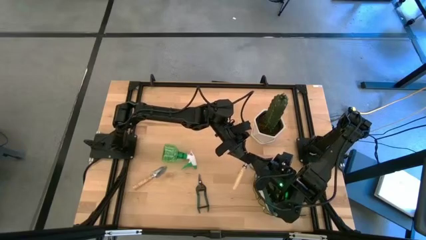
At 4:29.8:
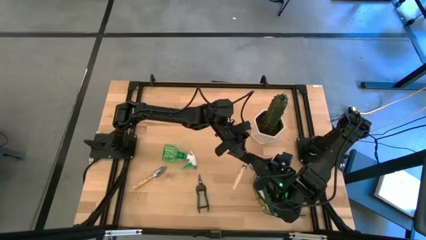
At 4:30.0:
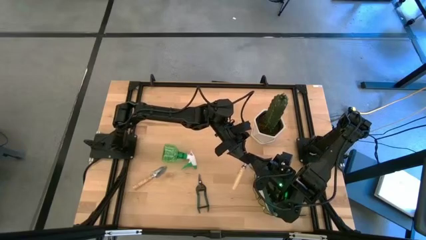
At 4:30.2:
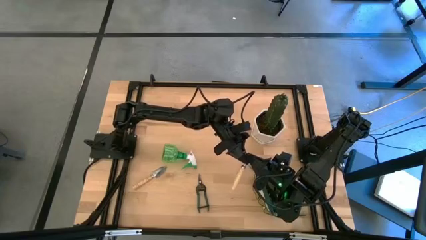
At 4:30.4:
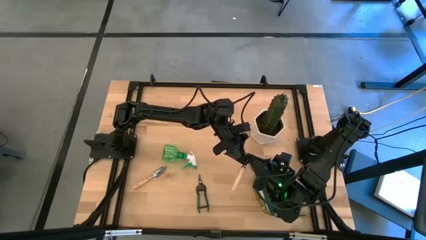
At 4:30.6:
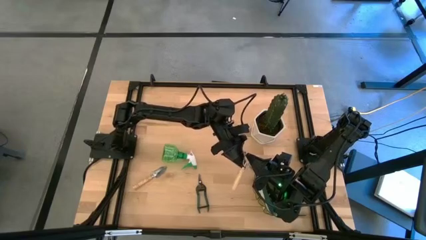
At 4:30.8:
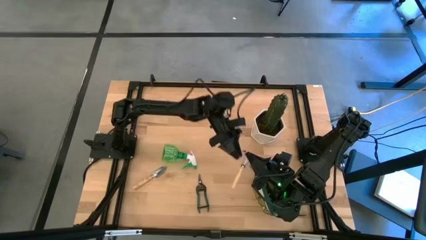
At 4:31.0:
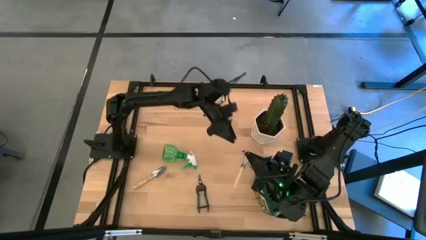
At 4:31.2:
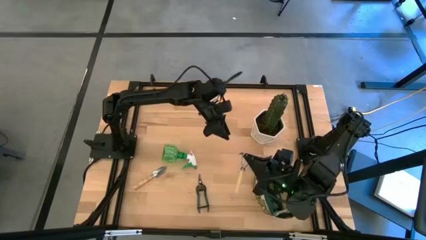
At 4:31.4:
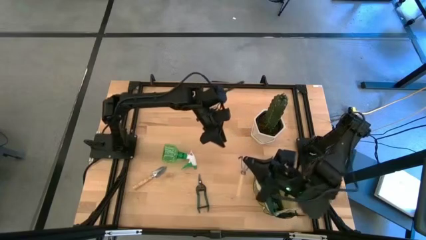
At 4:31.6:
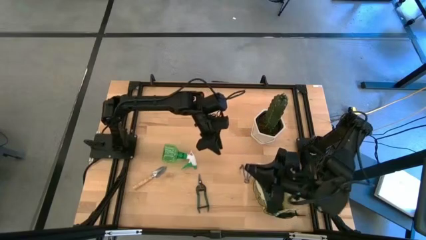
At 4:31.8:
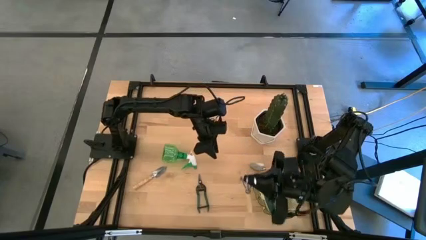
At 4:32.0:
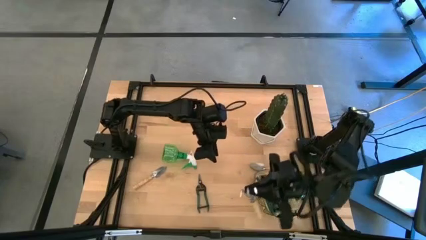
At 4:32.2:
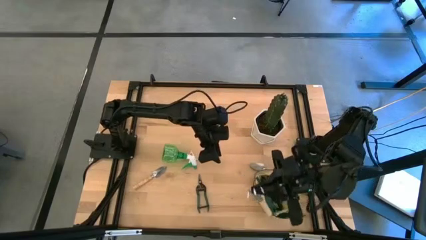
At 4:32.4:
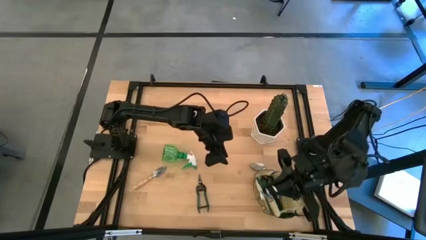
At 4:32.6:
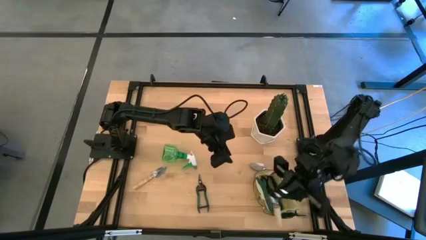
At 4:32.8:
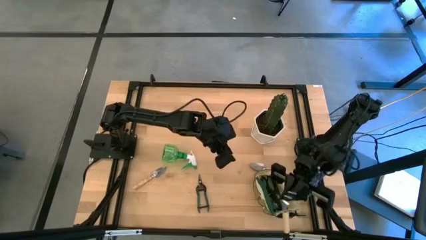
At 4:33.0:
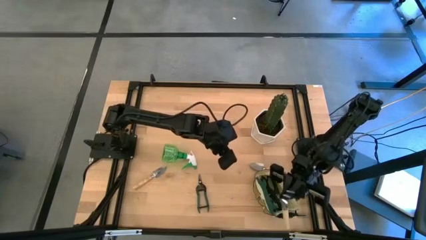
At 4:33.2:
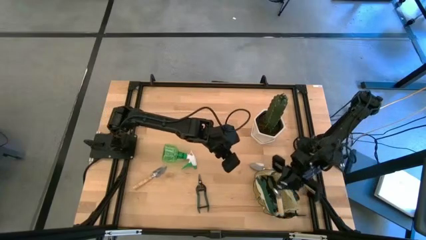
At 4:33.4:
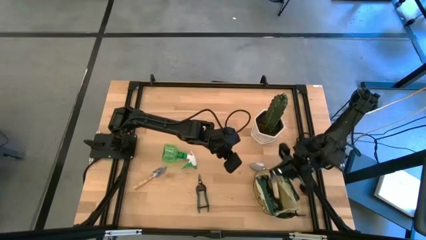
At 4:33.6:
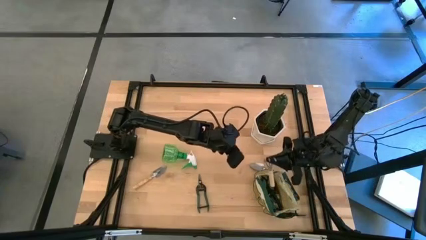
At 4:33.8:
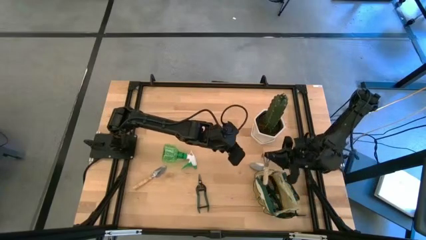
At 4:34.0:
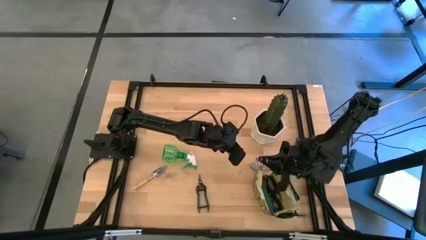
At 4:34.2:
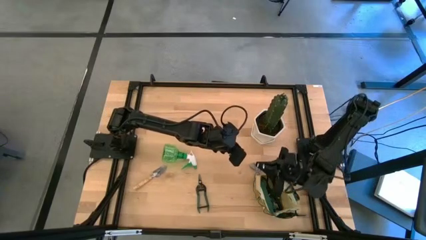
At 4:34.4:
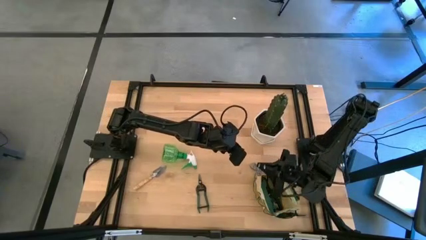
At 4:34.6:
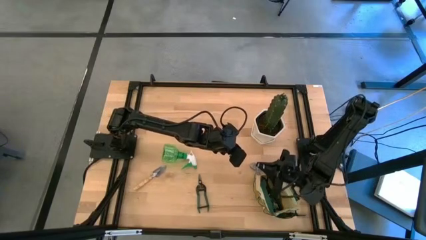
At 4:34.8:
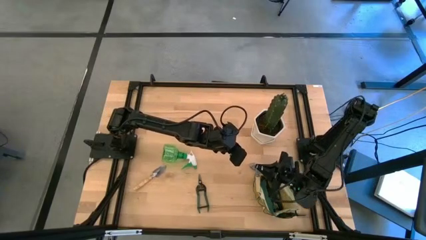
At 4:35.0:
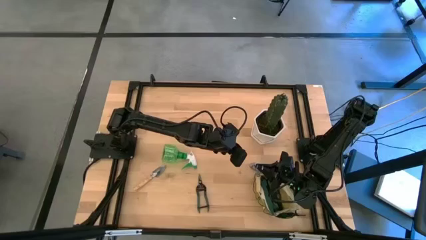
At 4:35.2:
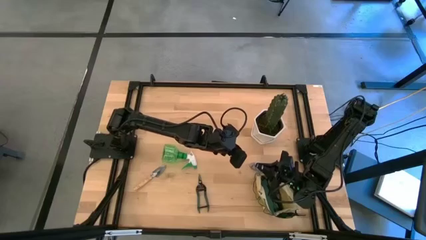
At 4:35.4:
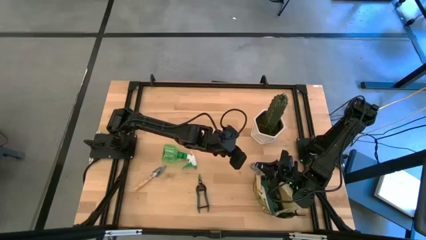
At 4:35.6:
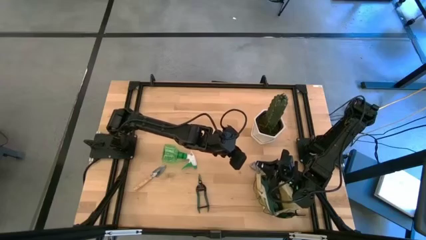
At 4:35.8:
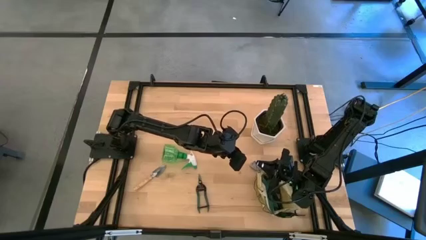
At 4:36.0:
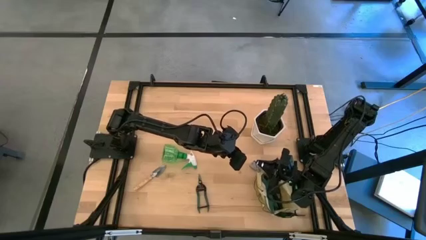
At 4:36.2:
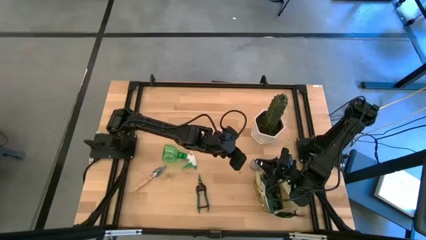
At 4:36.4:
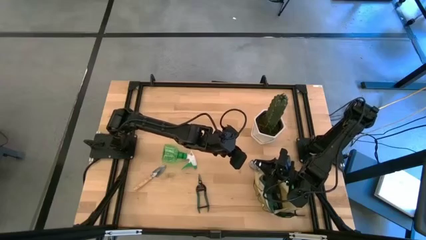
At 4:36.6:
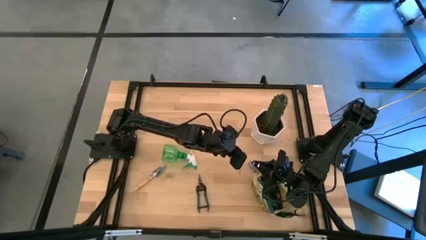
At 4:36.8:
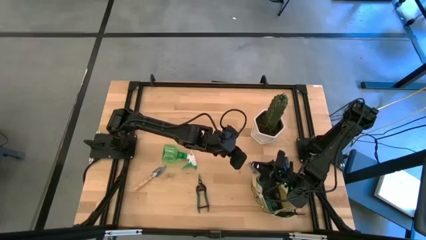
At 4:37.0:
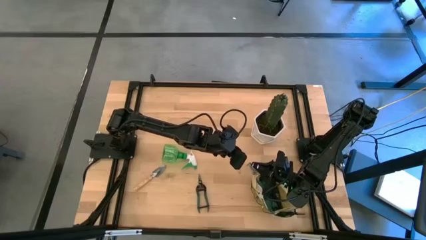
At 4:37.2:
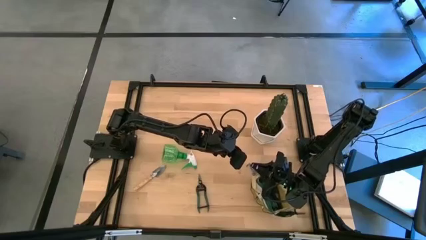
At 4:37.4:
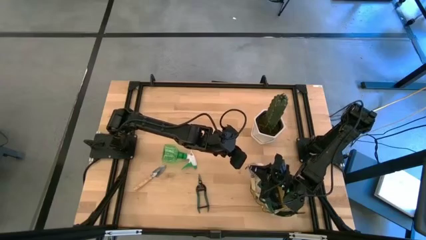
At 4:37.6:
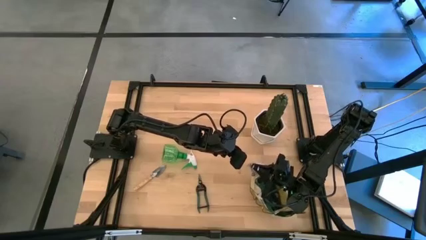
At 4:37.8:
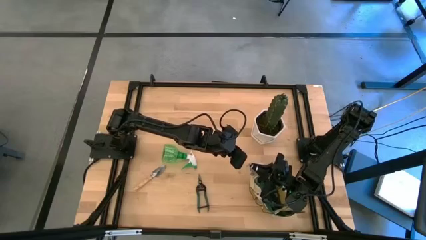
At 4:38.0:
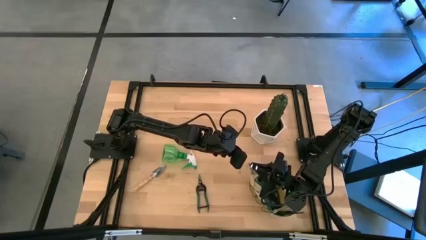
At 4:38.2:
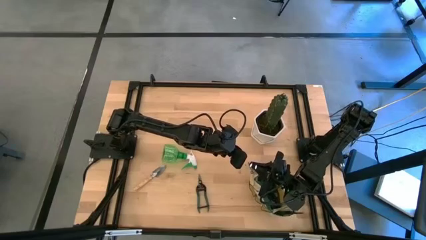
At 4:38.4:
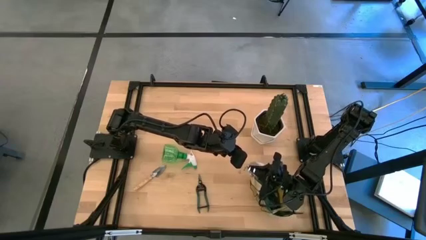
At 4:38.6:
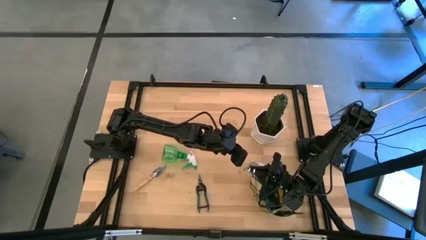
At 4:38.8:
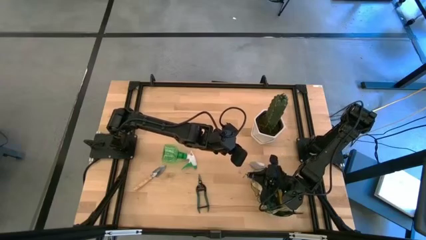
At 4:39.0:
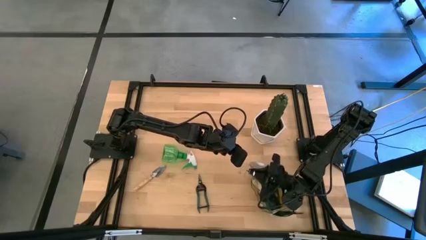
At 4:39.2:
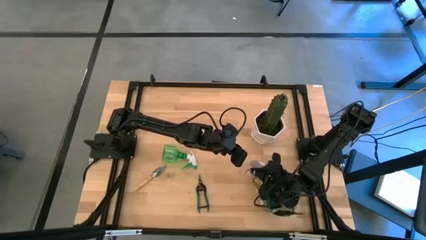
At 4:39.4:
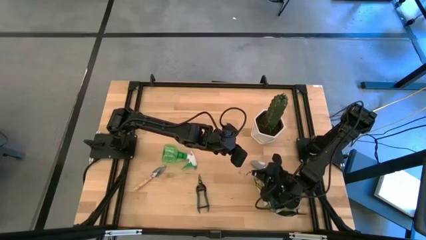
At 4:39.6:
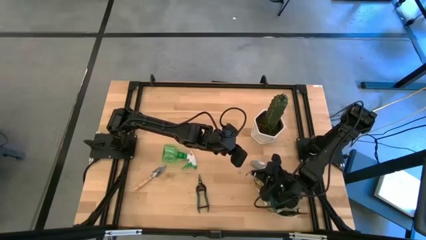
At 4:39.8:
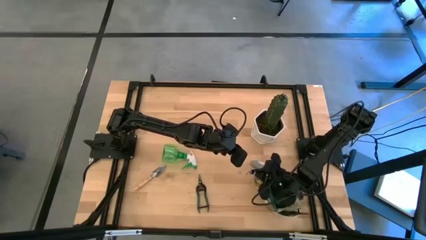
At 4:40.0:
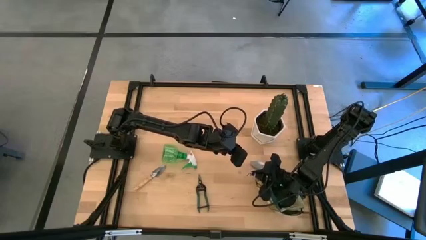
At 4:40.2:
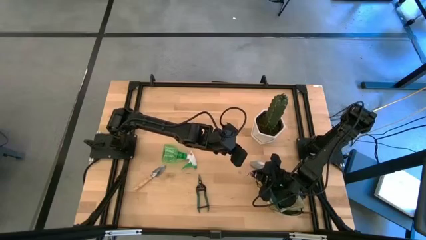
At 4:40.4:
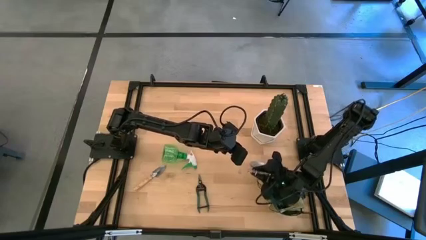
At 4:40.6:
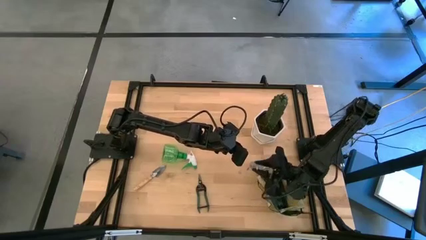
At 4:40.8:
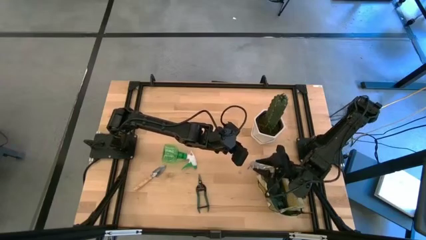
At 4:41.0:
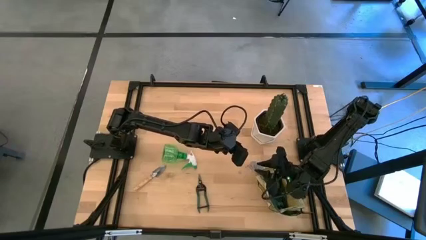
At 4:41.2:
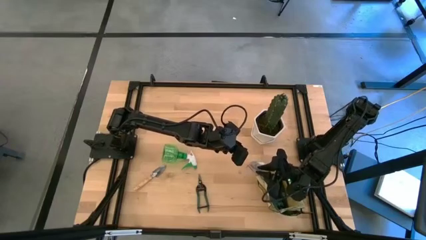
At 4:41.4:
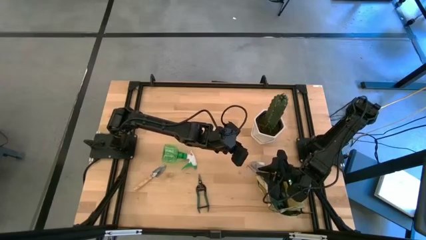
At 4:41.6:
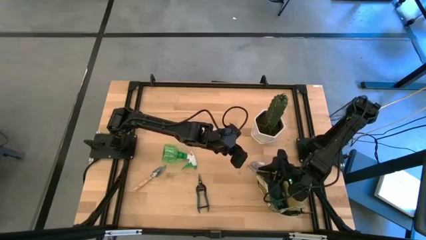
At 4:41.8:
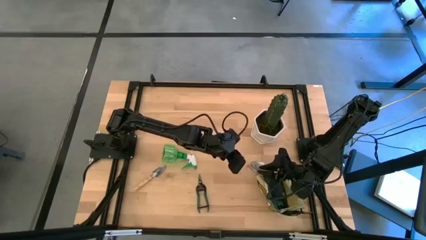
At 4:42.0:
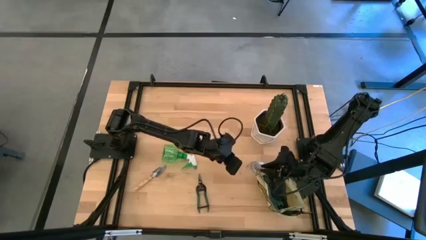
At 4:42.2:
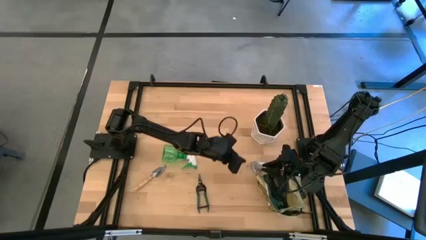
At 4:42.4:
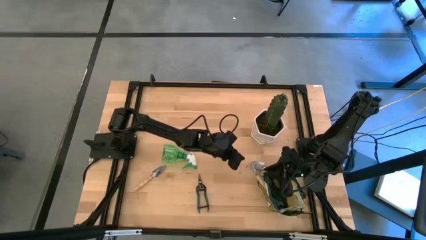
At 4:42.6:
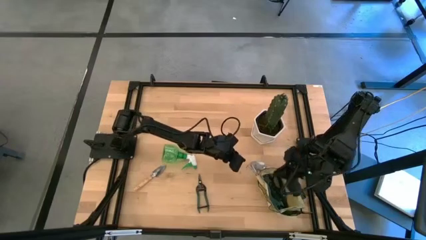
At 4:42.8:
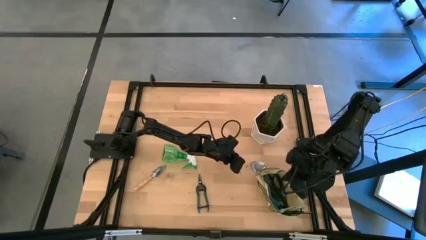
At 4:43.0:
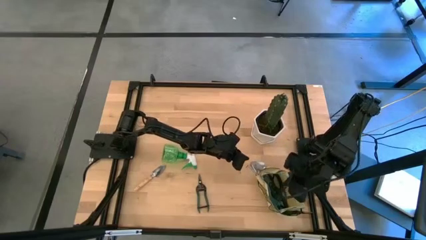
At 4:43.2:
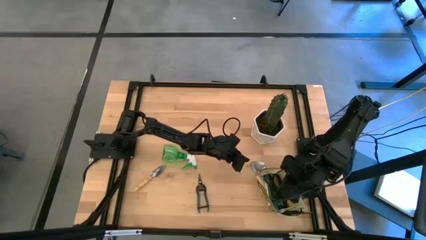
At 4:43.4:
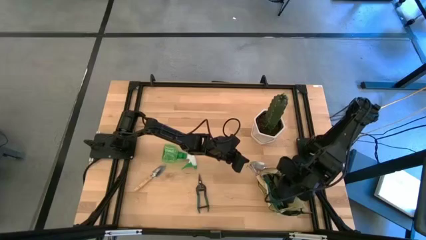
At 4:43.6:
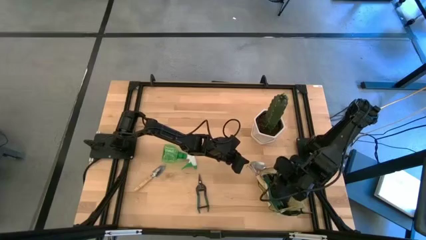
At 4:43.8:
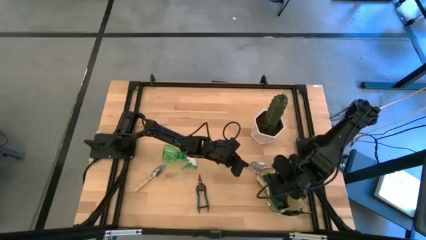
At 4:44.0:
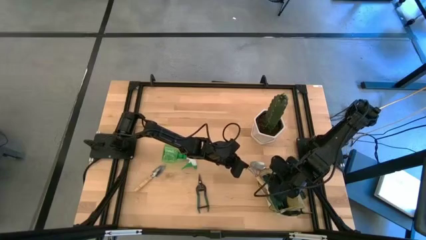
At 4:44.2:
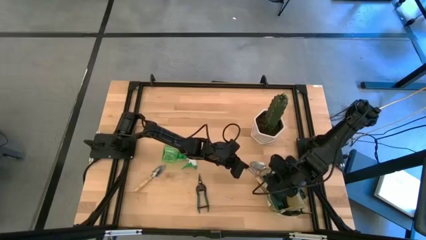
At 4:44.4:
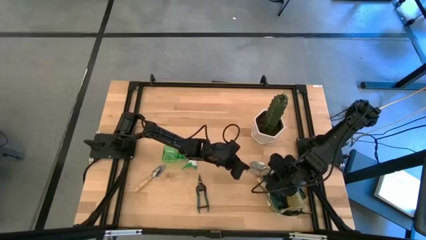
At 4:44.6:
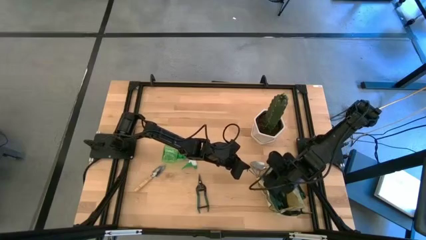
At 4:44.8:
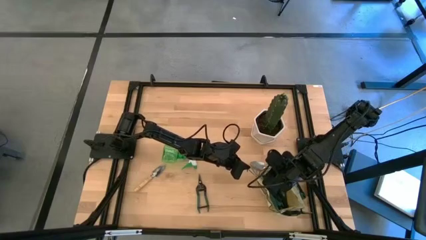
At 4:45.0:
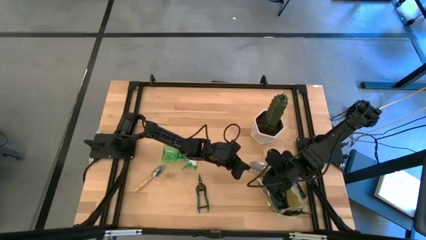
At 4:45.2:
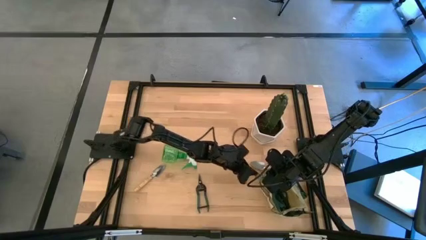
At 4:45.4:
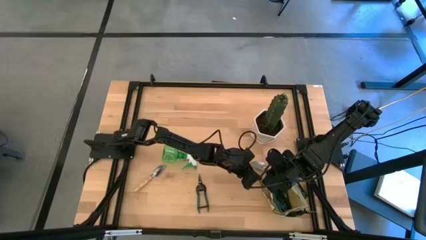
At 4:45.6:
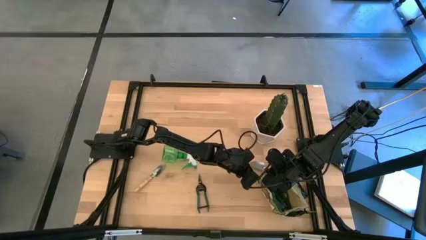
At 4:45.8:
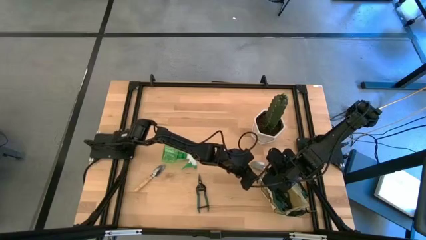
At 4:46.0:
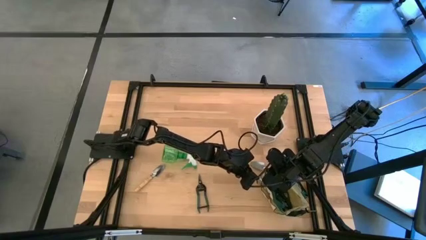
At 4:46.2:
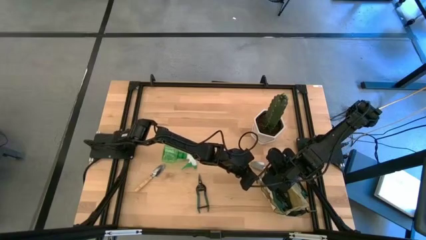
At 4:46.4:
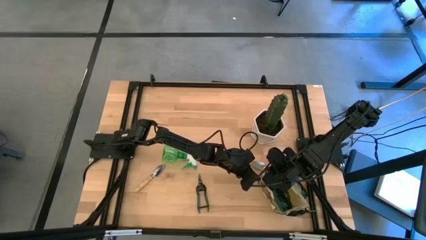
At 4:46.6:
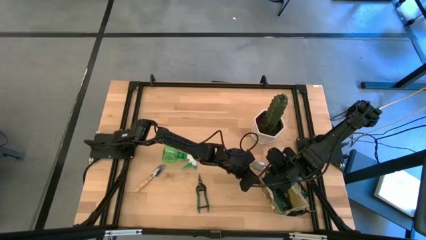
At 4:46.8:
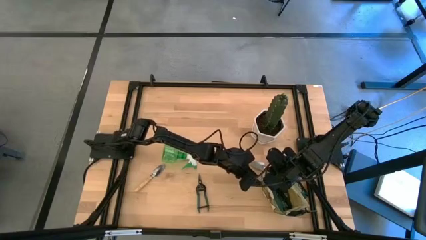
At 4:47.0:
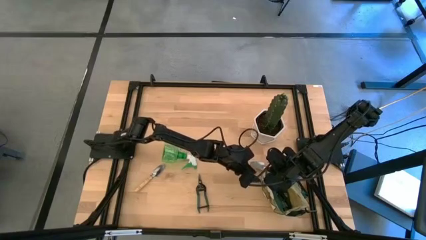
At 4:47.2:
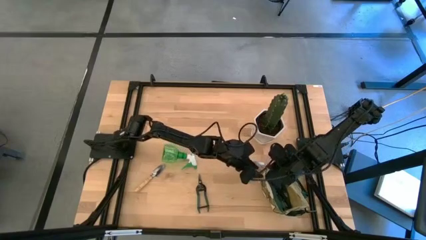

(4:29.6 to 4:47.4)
Task: Pick & Place Garden tools in Gardening bag
Put the hand rake into the side pocket of the white bag
